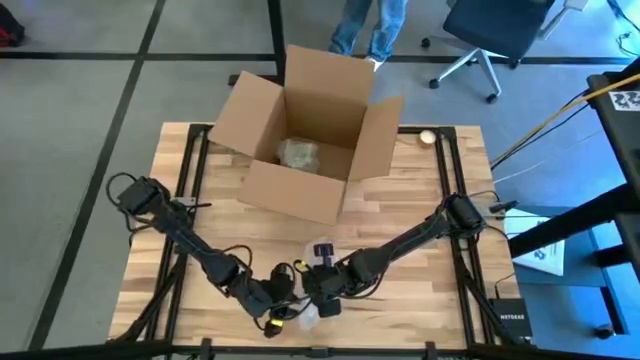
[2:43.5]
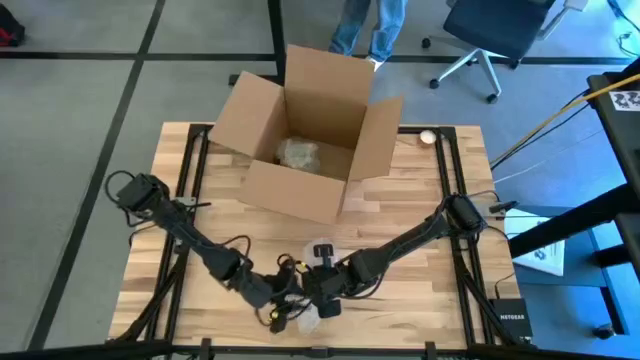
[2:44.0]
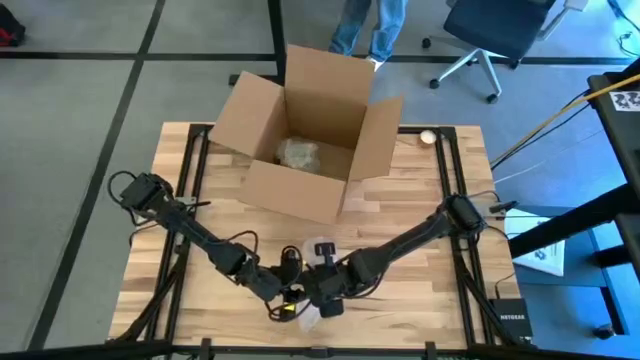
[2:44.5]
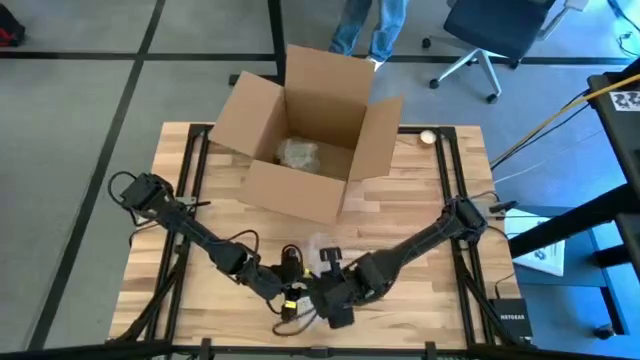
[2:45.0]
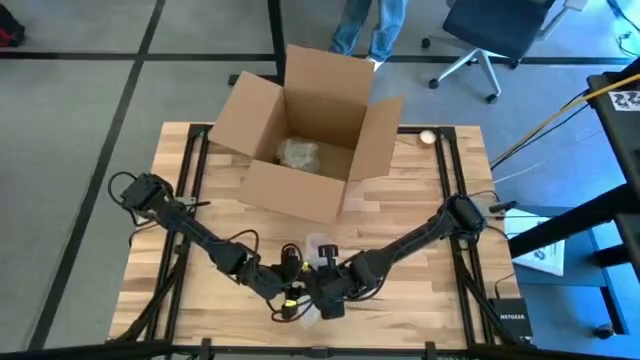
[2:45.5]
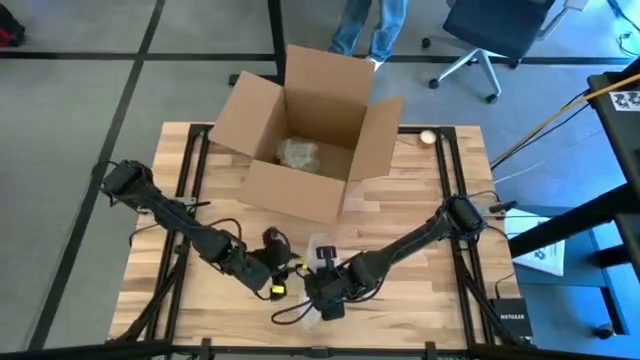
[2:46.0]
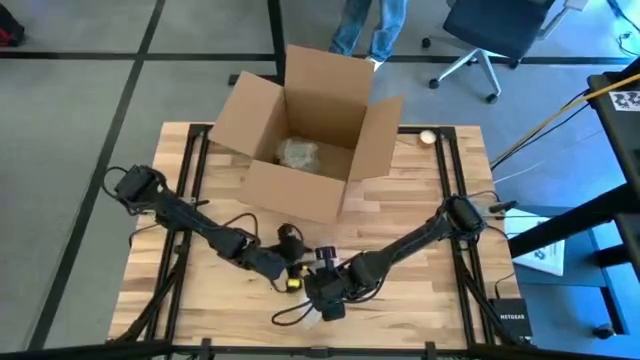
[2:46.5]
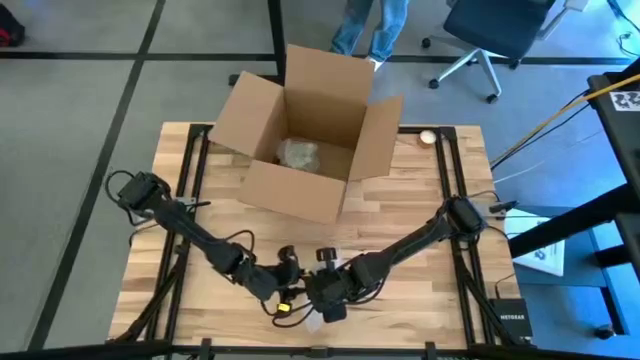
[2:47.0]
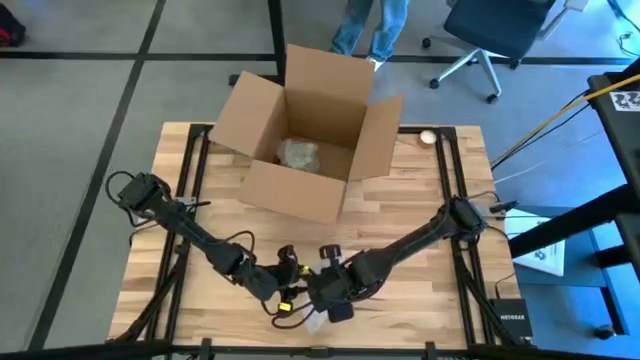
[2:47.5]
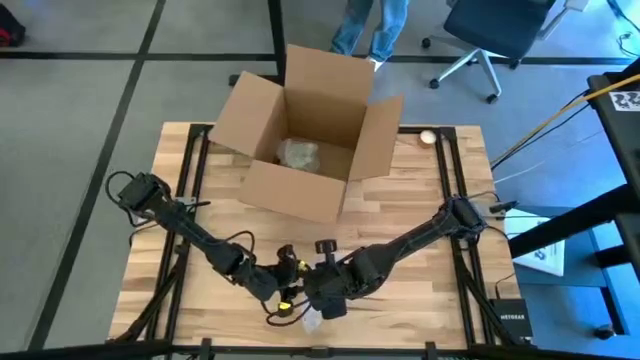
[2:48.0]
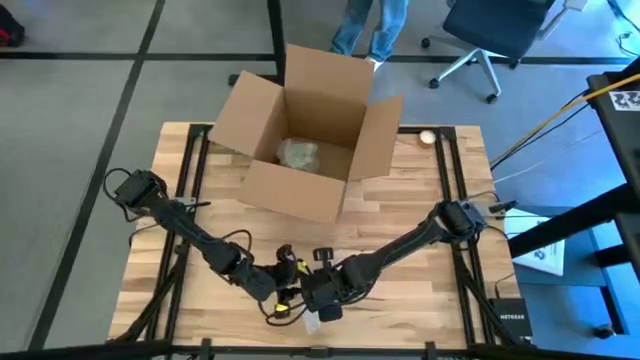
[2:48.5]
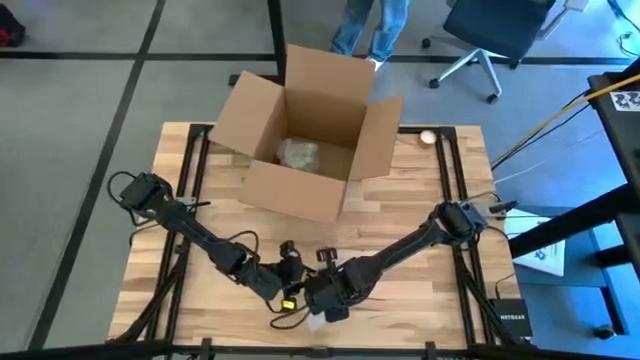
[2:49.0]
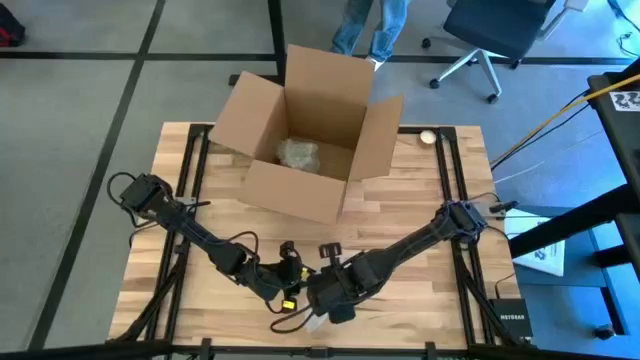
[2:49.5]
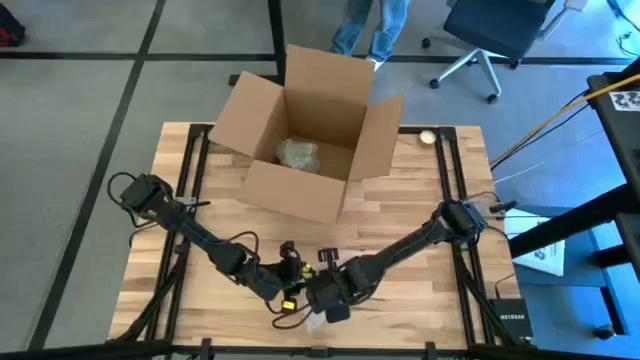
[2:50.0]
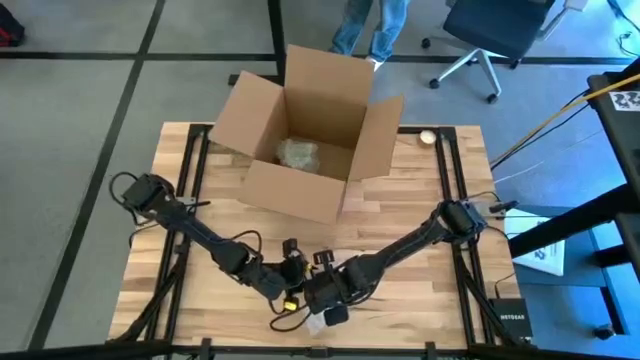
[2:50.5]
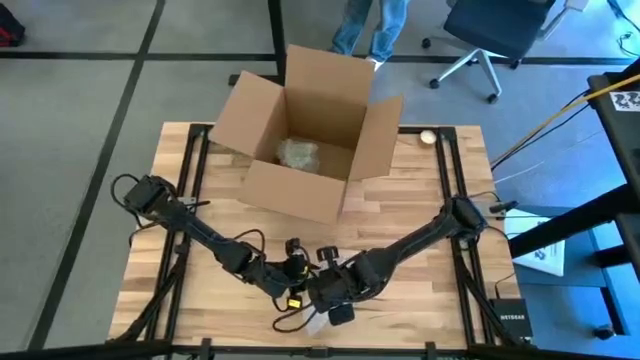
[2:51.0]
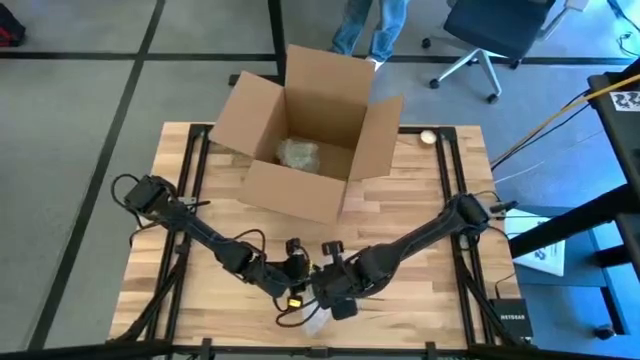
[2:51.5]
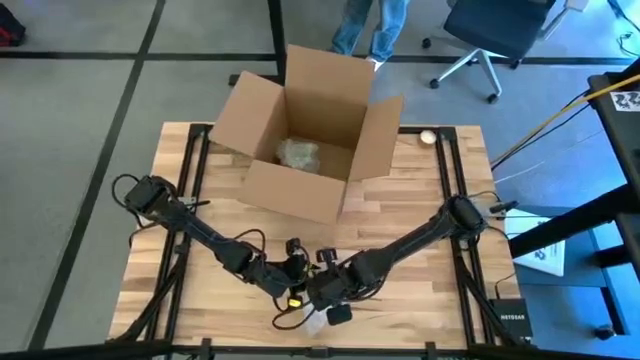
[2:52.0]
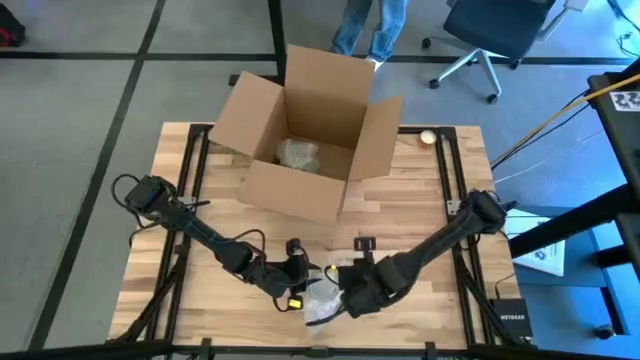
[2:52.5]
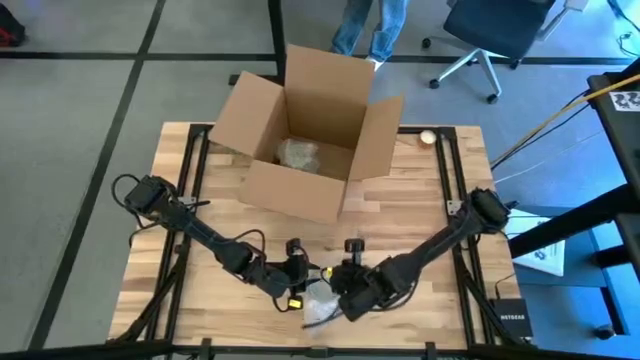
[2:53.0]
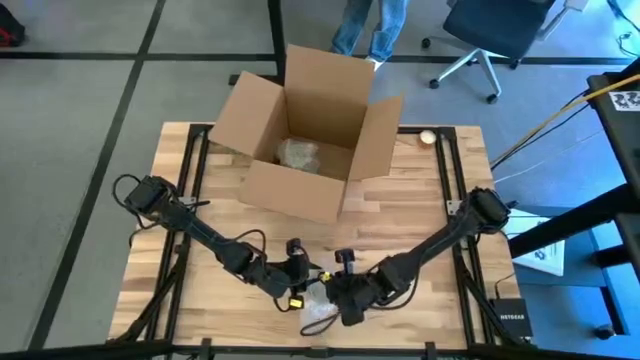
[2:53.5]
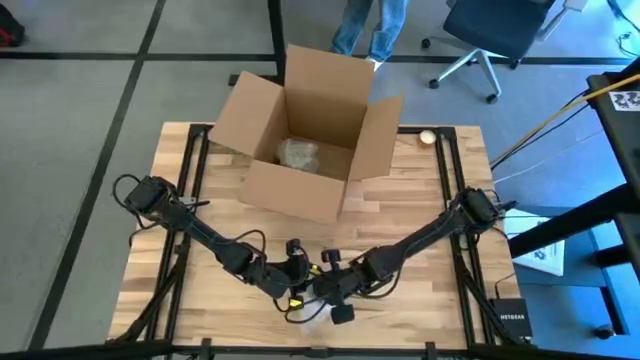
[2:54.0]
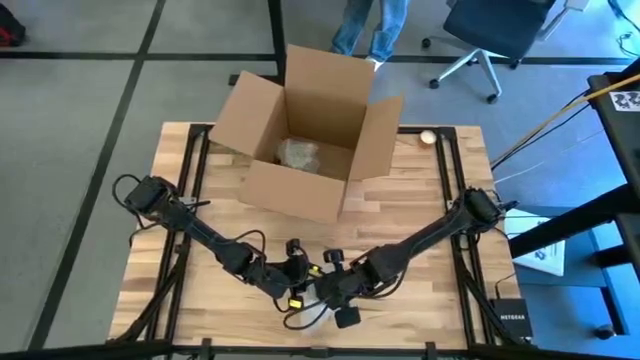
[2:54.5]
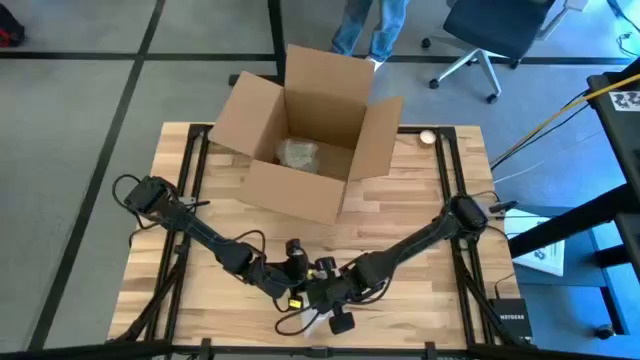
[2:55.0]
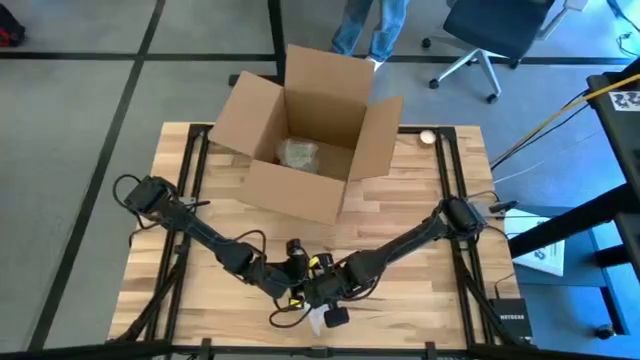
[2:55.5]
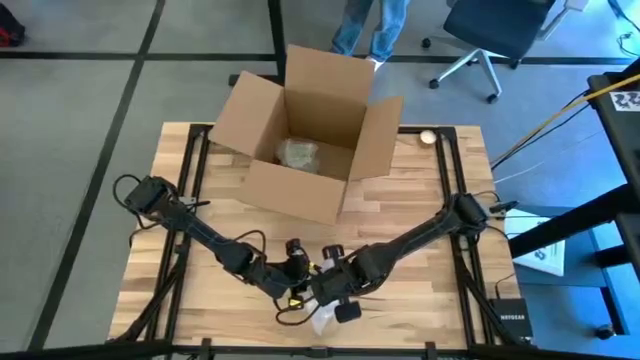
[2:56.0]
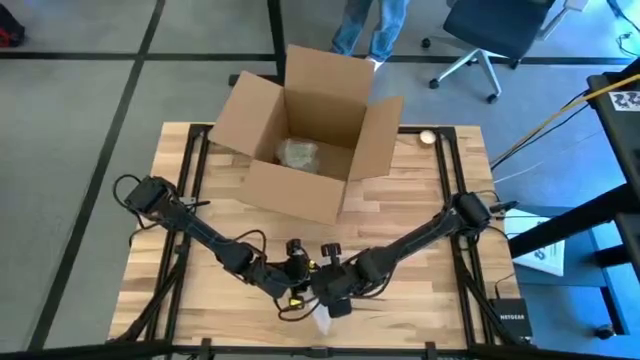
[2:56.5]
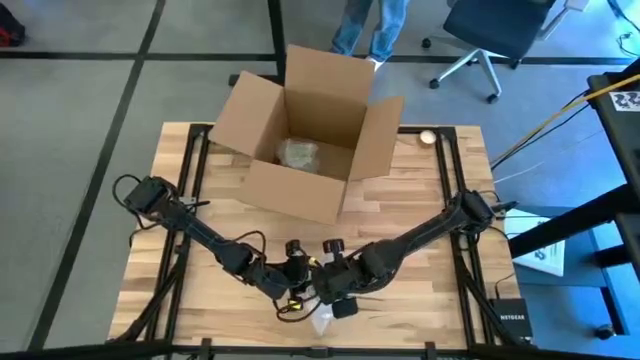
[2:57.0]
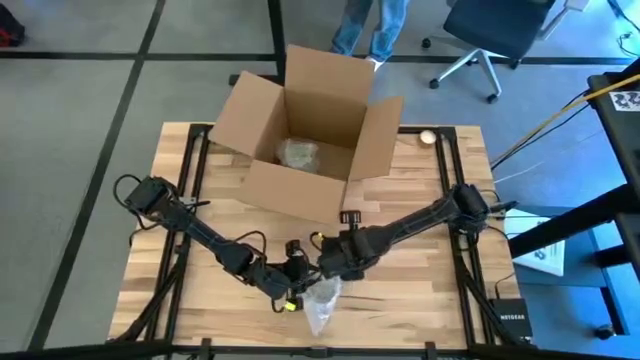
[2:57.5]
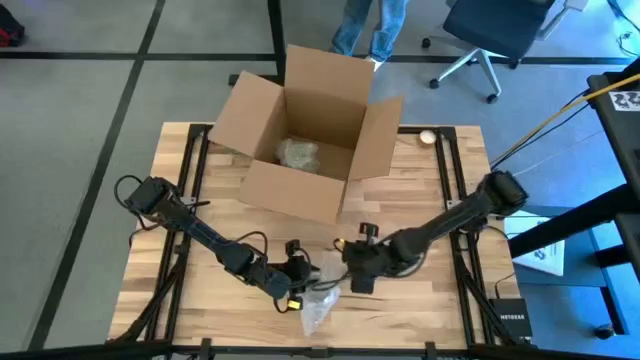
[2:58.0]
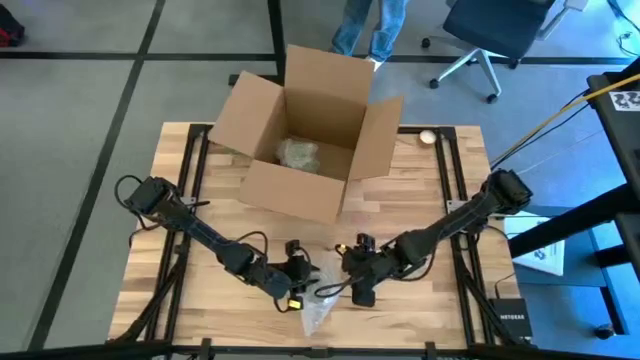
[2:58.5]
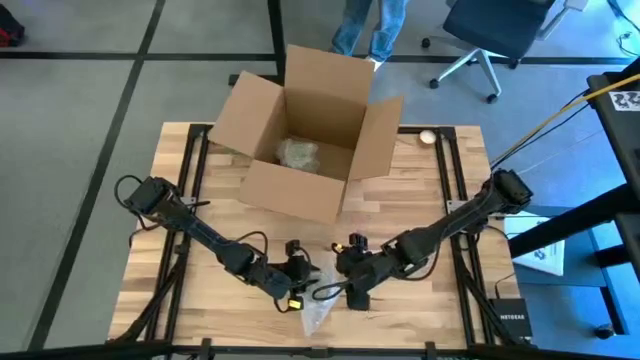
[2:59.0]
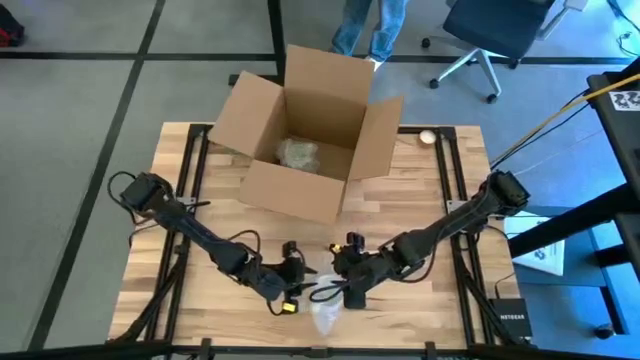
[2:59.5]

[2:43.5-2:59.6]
Task: wrap mug
Wrap the blue mug with bubble wrap

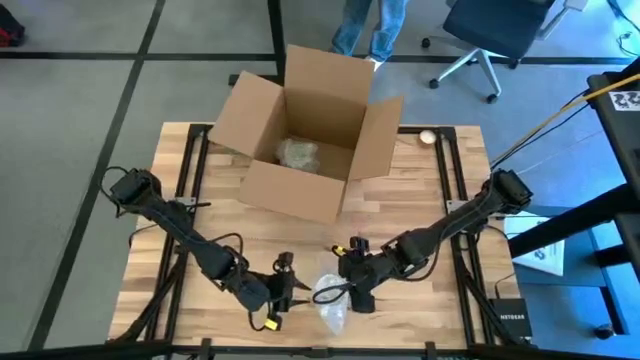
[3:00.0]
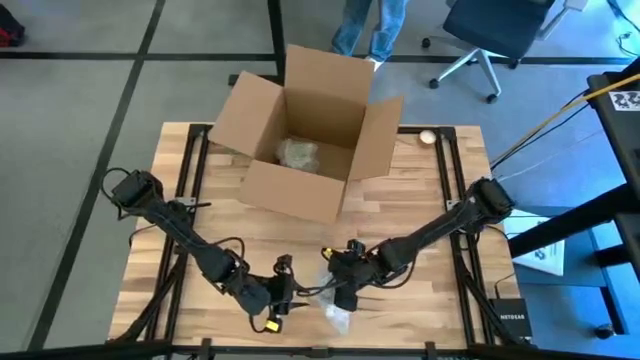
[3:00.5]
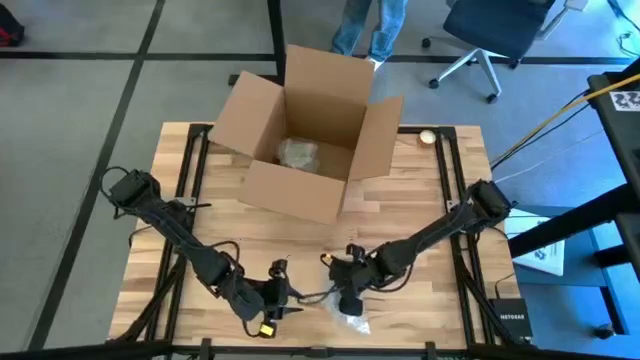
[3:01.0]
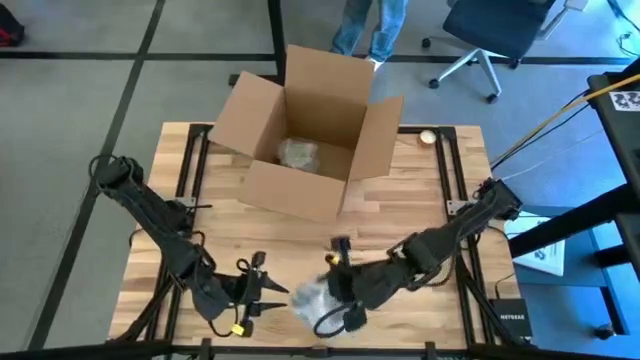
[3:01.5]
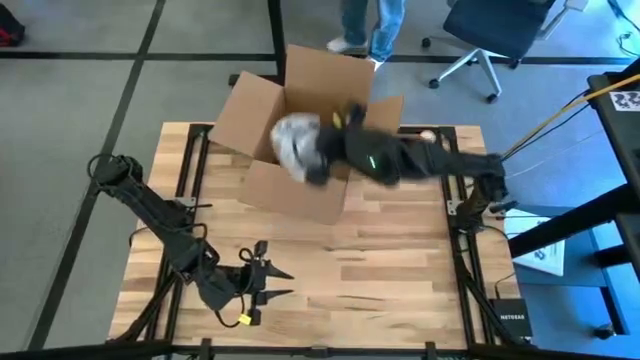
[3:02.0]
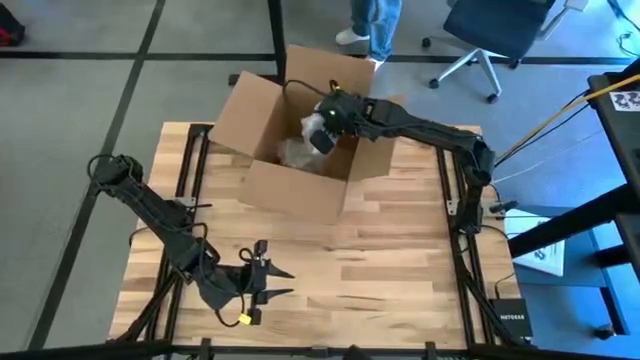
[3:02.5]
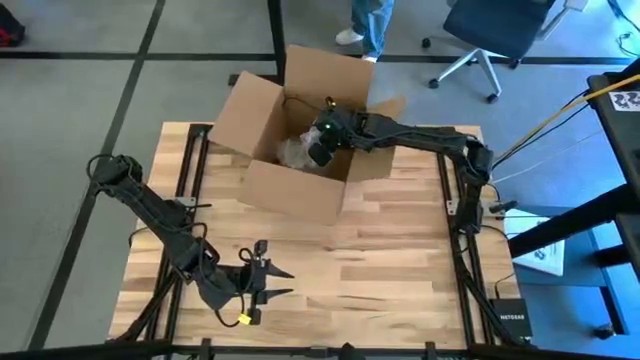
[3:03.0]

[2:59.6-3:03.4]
Put the wrapped blue mug into the cardboard box

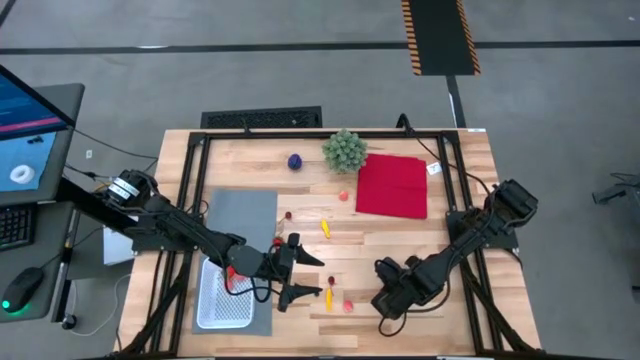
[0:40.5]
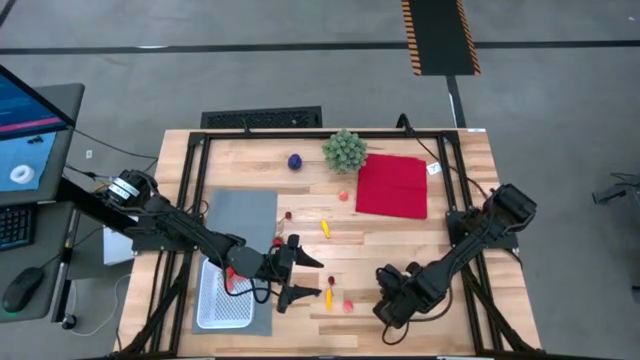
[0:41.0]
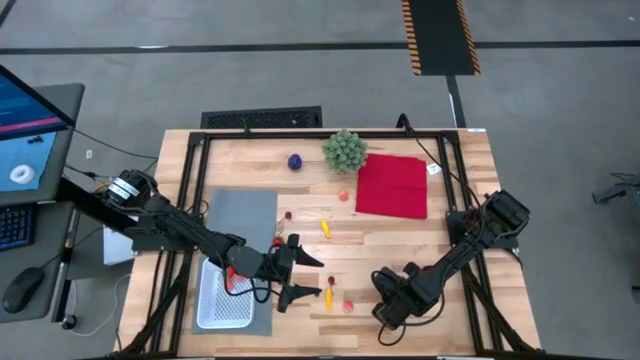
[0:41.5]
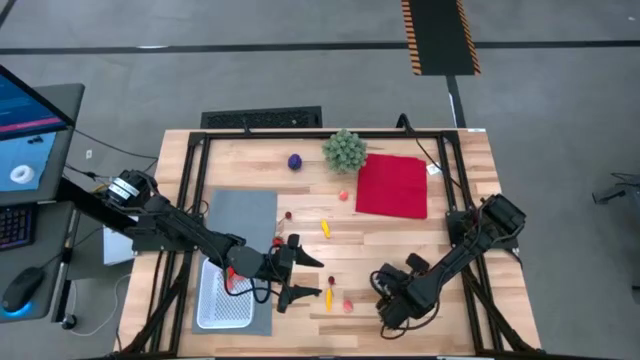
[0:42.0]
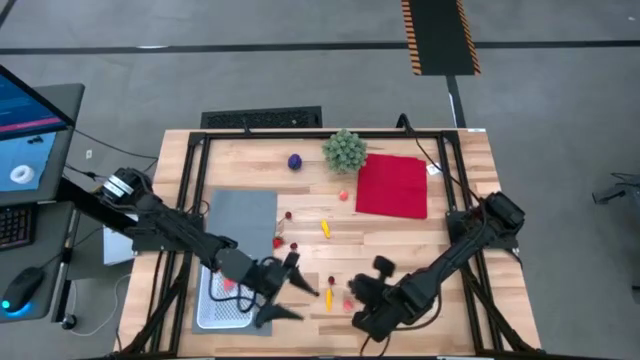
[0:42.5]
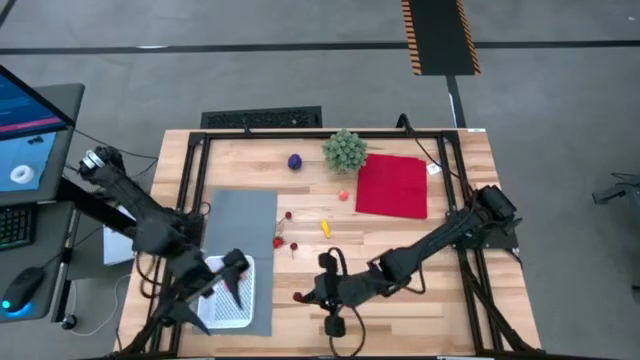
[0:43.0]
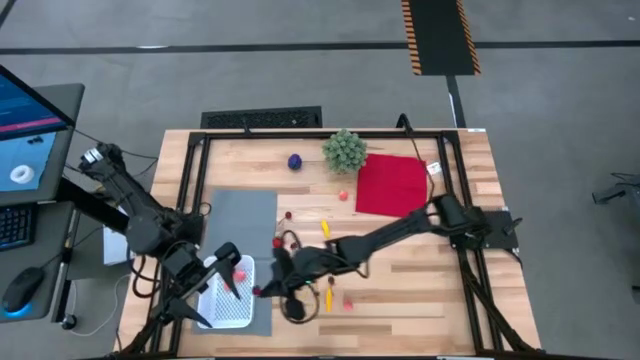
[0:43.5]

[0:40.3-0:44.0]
Task: Pick and placing Produce into tupperware
Put the red cherry into the white basket
